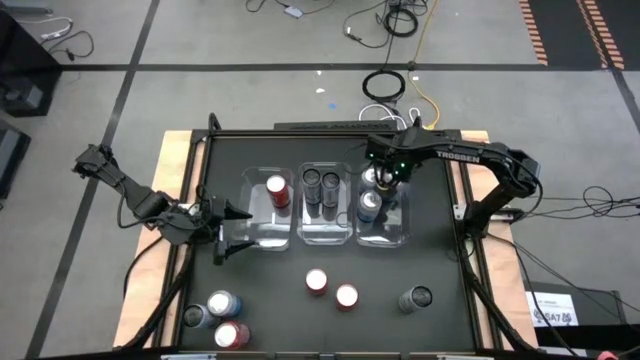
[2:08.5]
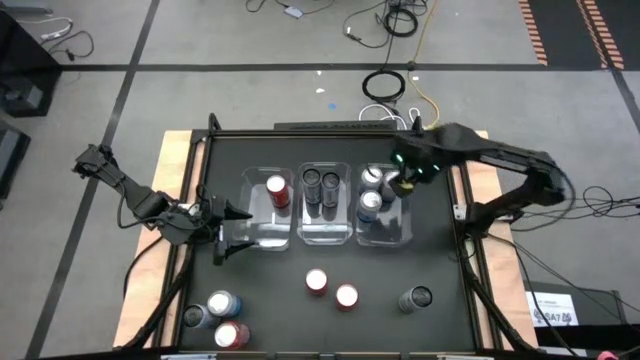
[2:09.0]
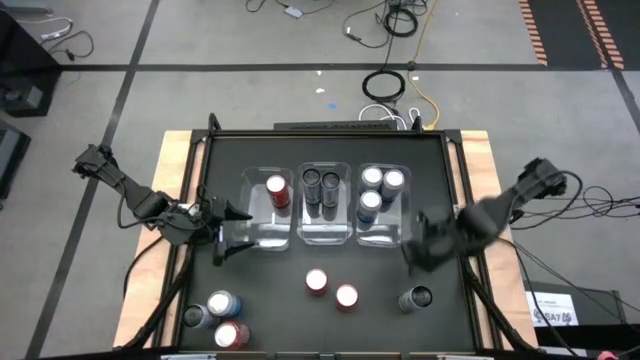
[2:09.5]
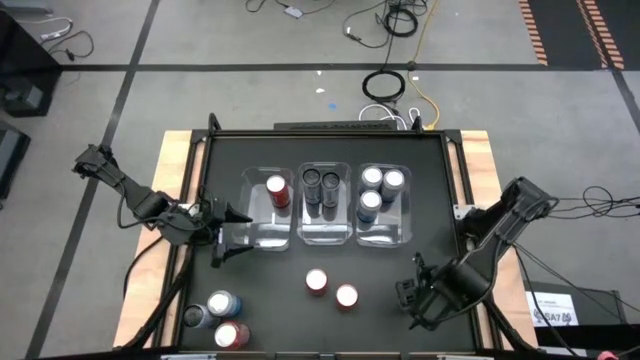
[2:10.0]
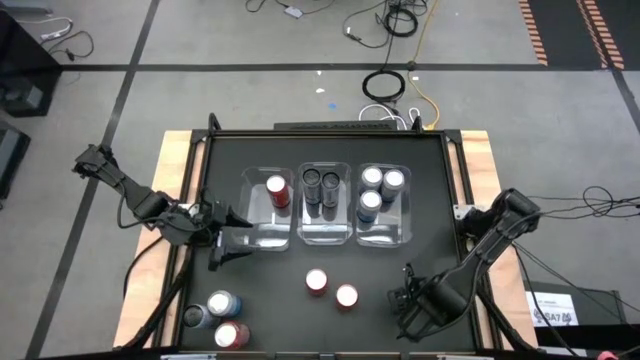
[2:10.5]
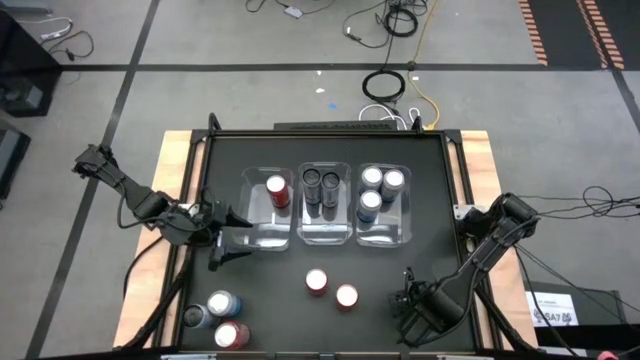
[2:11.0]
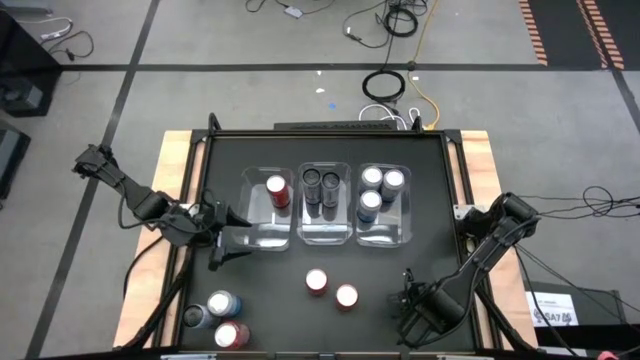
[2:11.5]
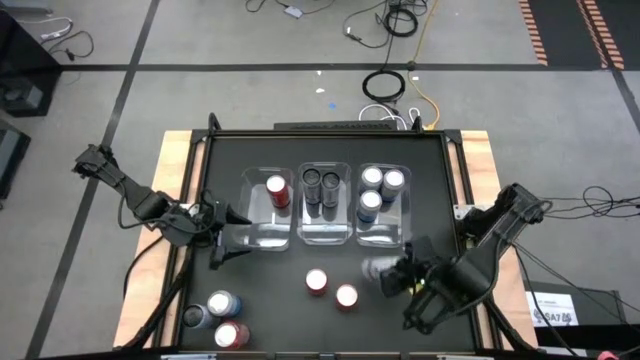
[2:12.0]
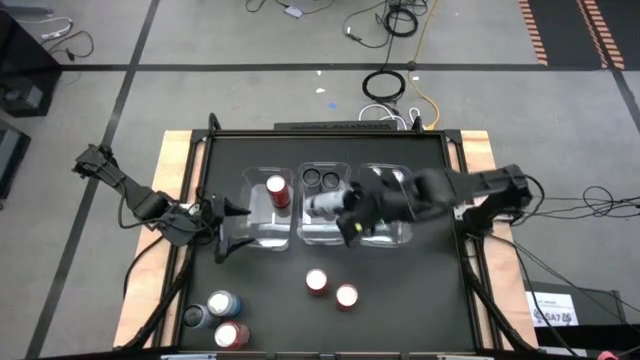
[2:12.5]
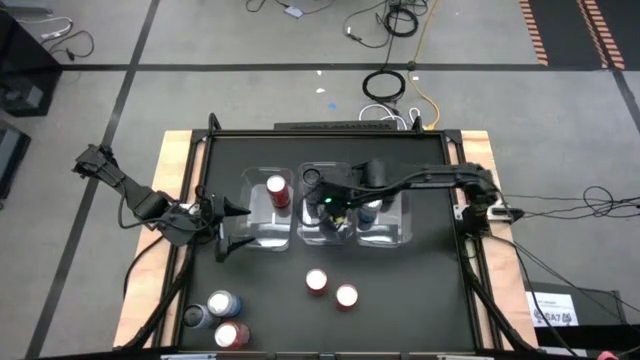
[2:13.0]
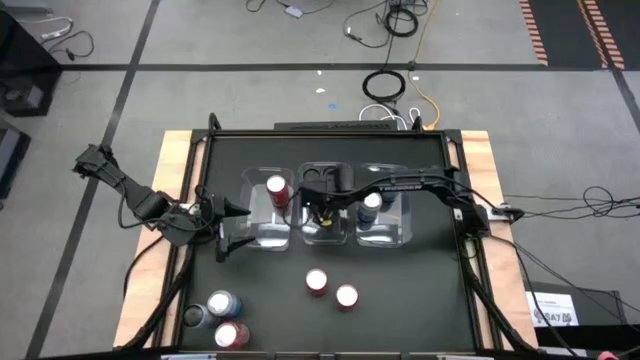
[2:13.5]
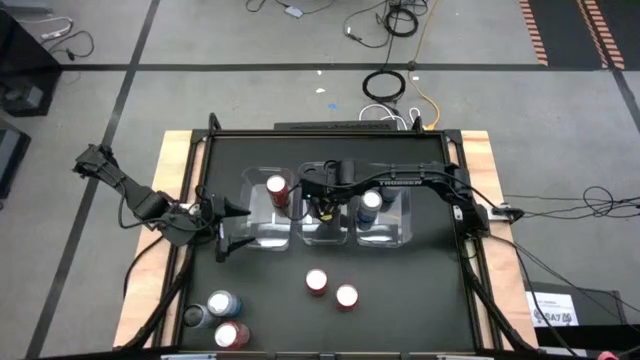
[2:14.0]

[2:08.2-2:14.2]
Task: Sort soda cans
Put the white-blue soda can into the center transparent bin

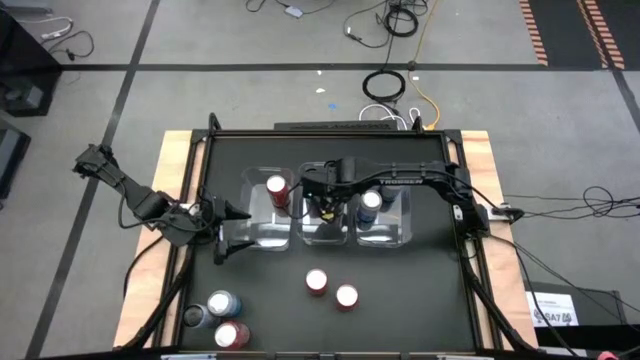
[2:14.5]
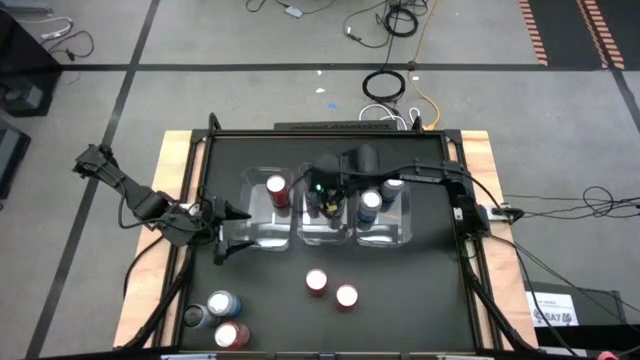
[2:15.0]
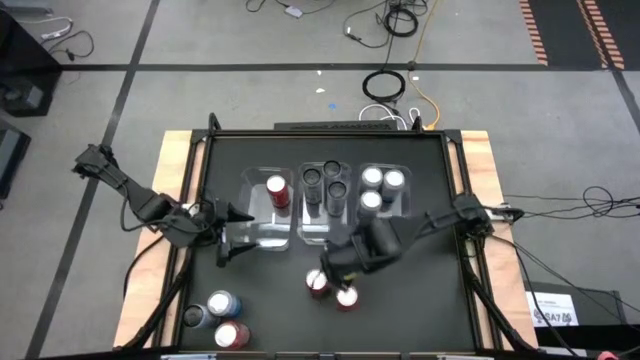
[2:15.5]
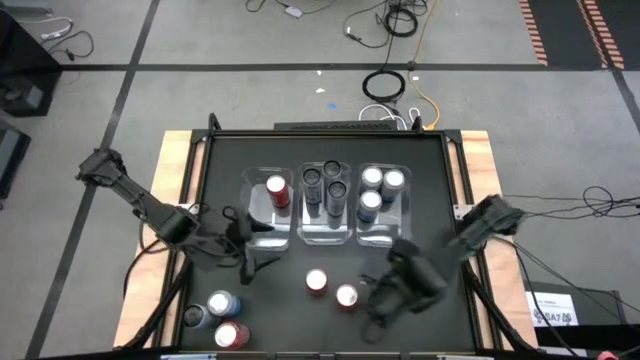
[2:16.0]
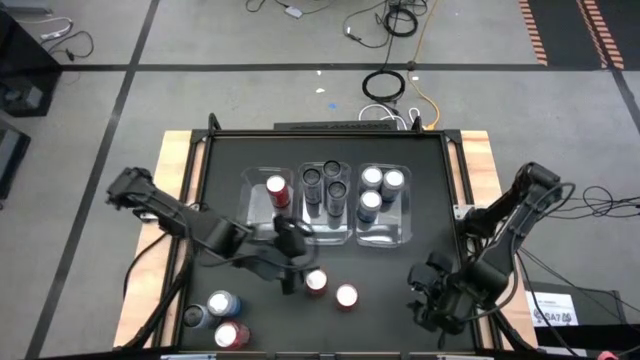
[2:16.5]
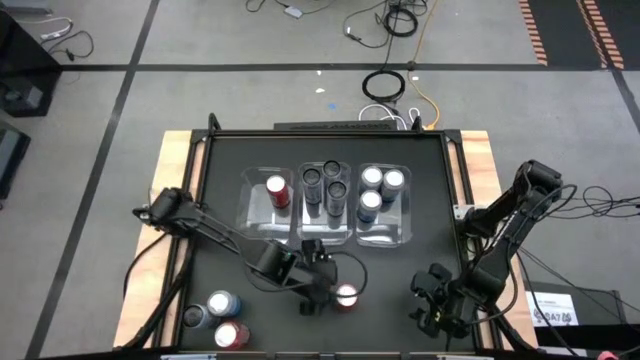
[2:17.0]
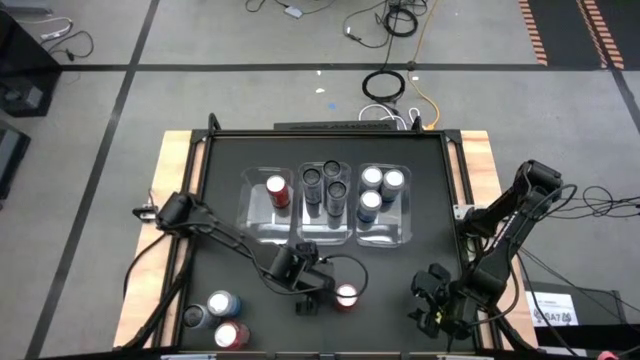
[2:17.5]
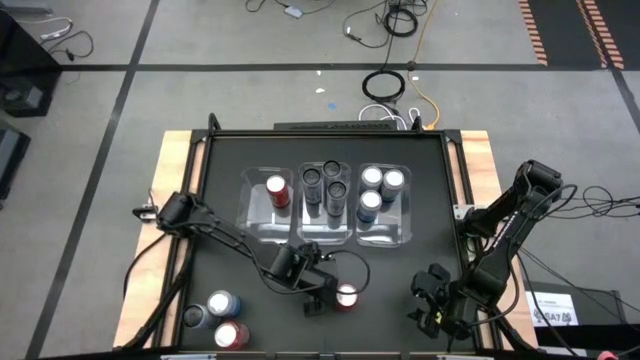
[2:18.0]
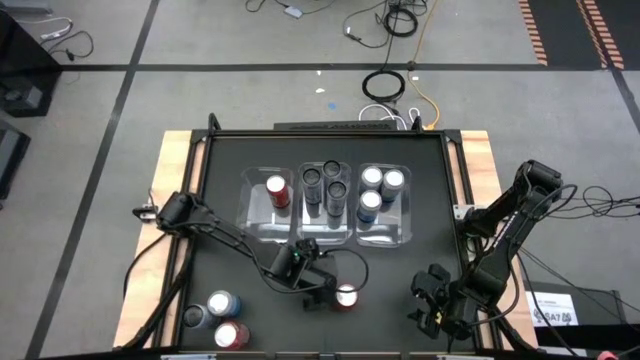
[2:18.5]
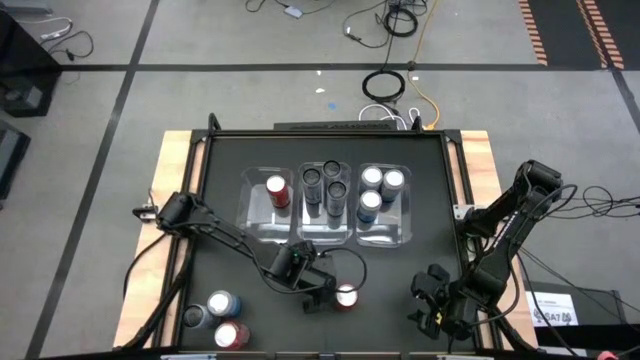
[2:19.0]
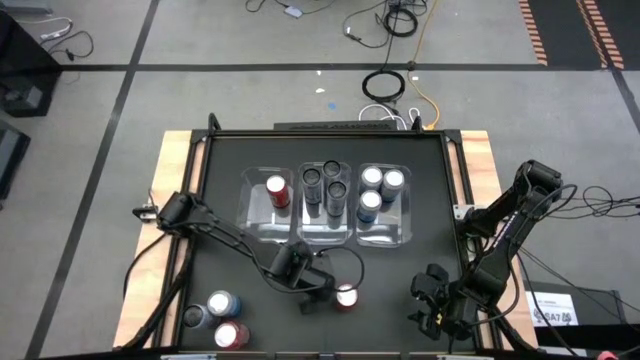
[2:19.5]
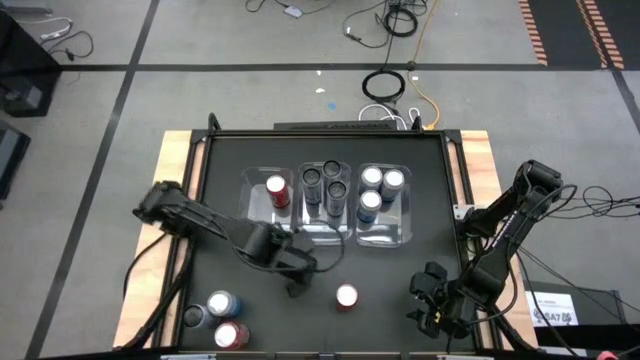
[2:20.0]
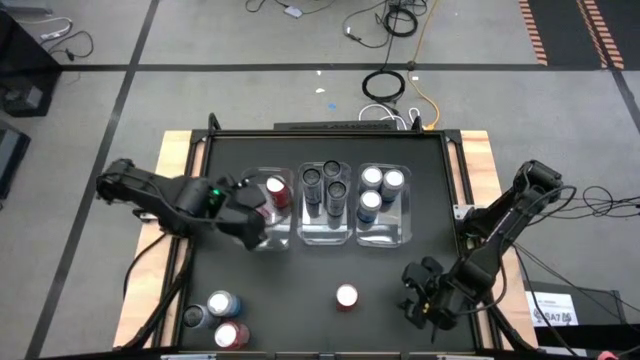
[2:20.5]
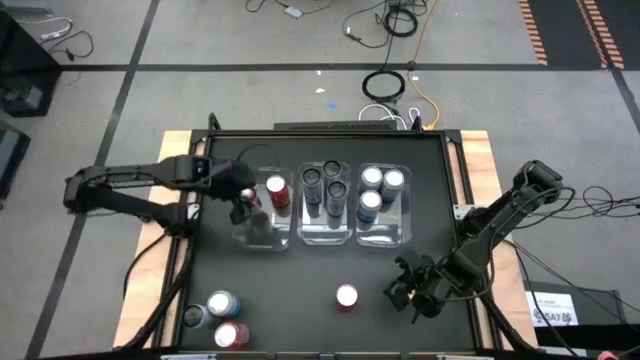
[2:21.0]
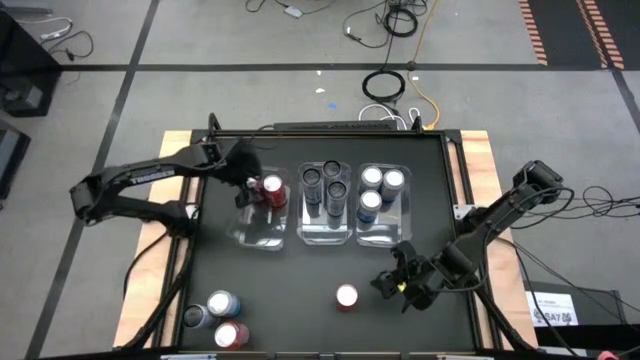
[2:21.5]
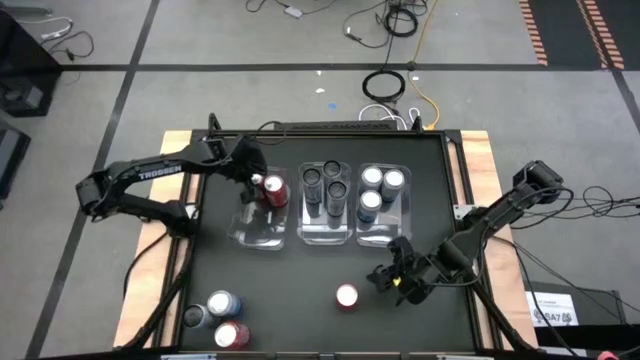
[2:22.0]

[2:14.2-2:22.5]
Put the red soda can into the middle left transparent bin

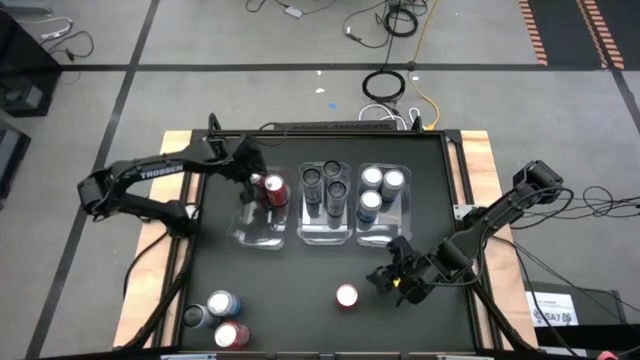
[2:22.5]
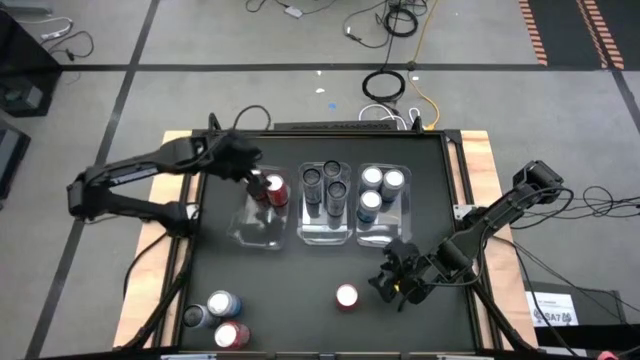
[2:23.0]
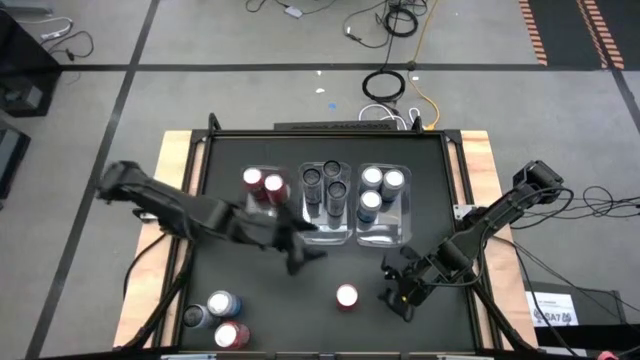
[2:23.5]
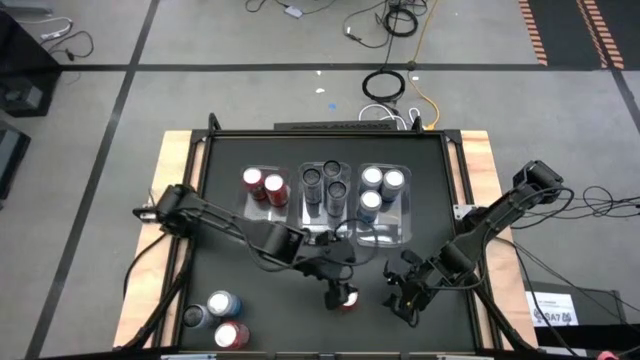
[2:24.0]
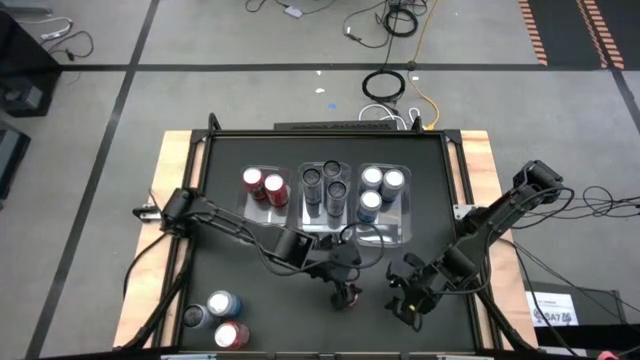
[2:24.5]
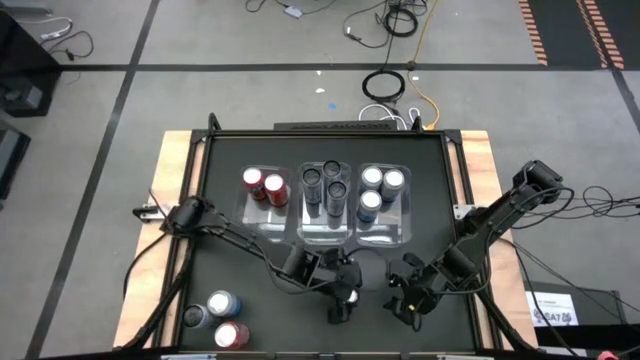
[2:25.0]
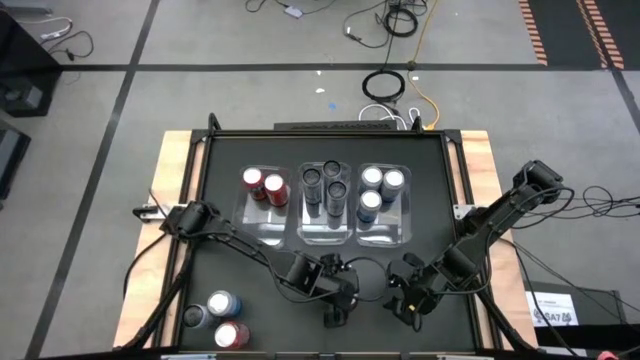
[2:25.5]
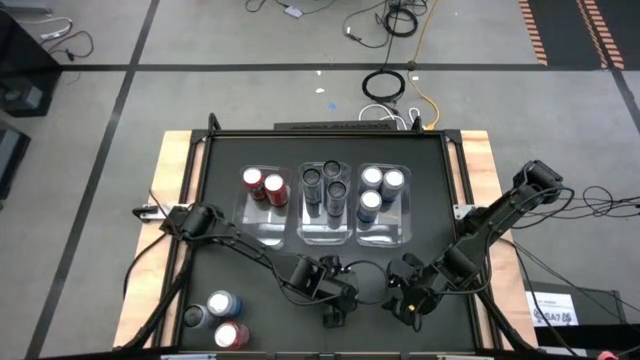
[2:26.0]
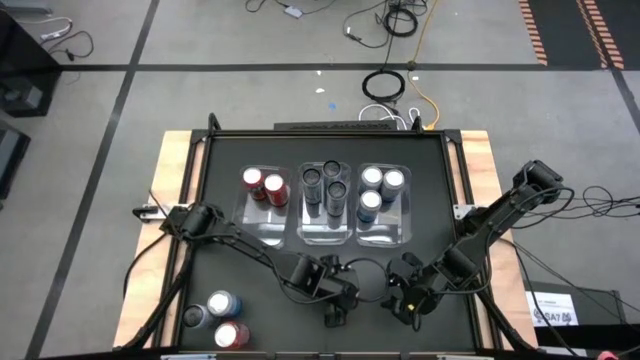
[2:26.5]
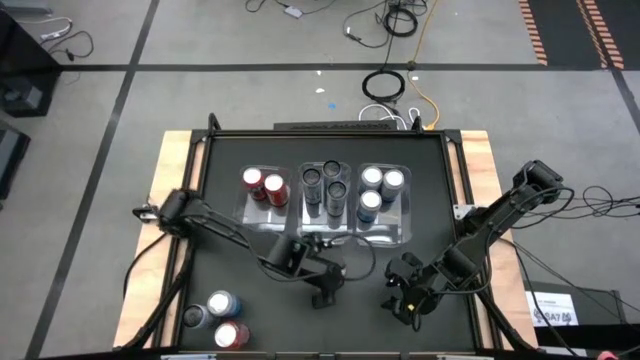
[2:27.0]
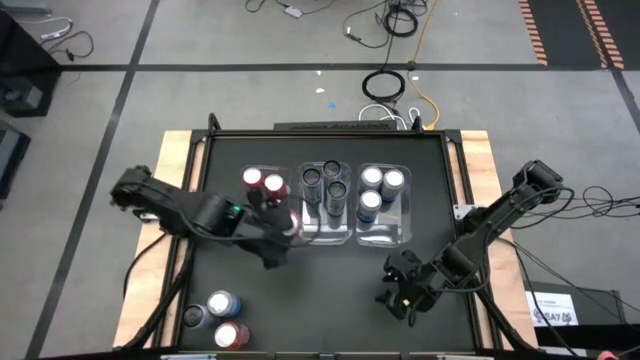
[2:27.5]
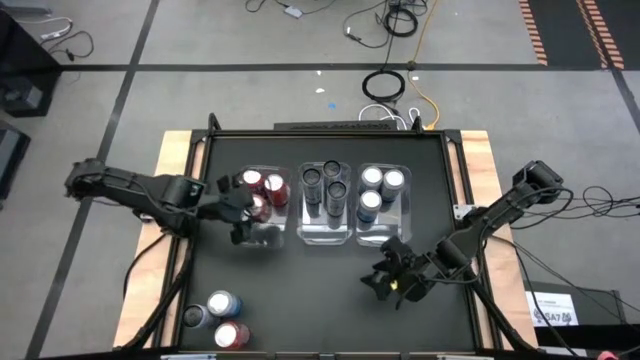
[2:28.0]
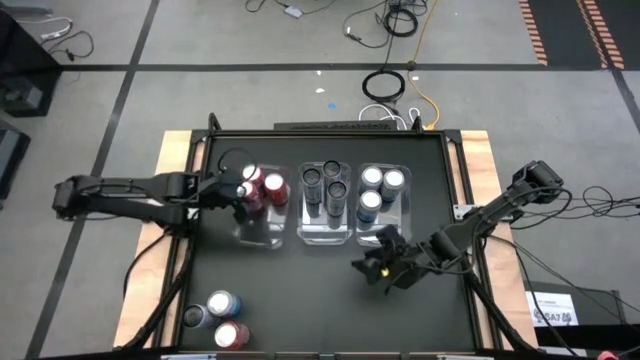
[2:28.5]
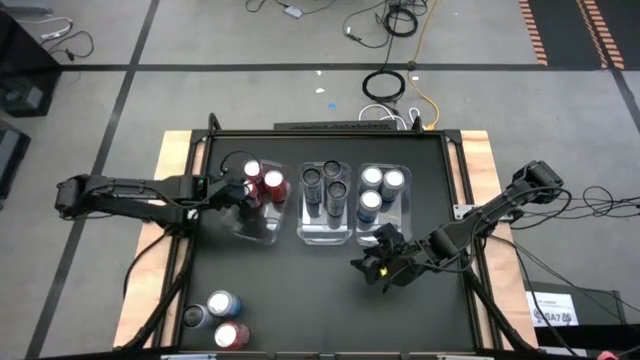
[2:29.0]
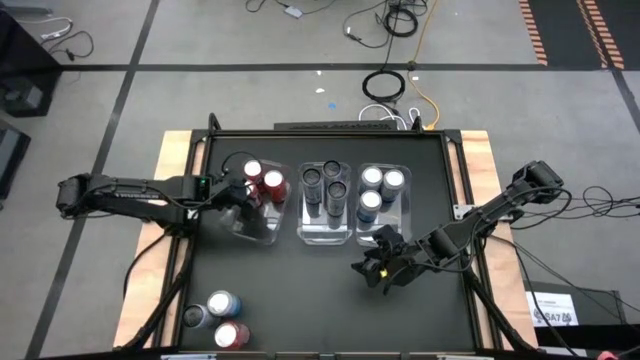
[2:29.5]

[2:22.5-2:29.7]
Put the red soda can into the middle left transparent bin

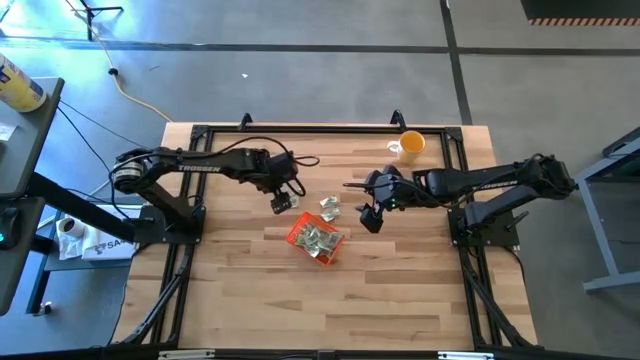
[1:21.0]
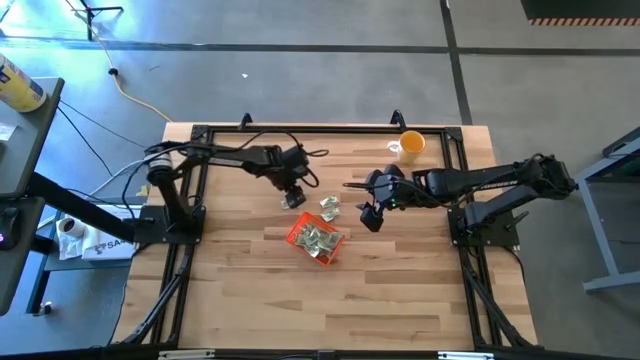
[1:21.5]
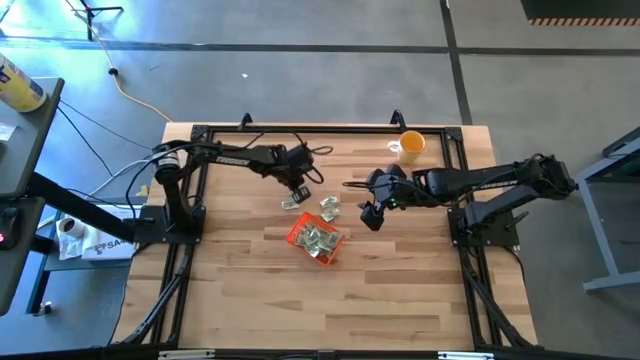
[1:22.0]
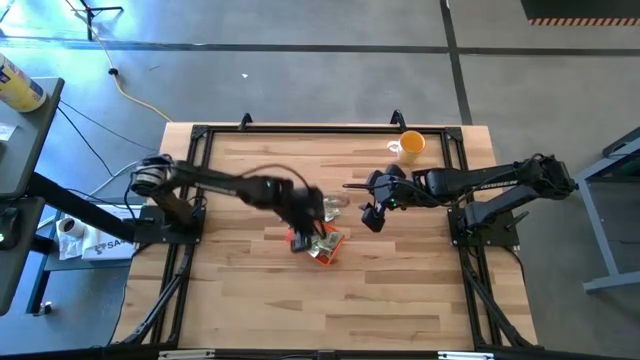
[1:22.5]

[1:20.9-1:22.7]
Task: Pick and place Stevia / Truvia into bins
Put the stevia packet into the orange bin
